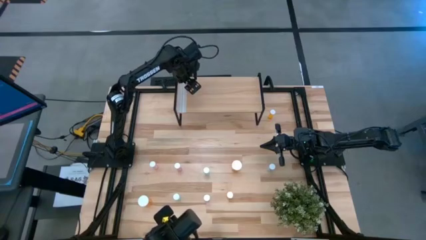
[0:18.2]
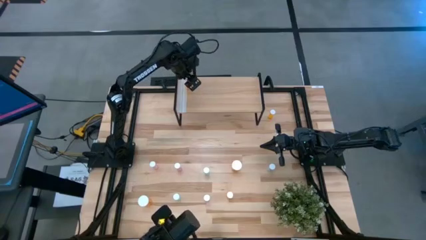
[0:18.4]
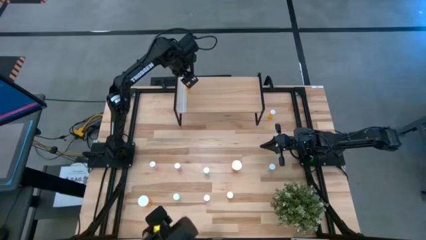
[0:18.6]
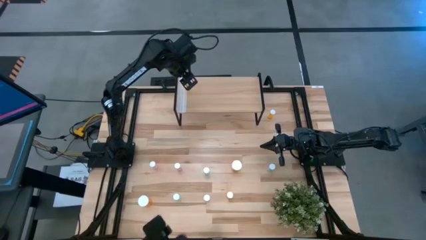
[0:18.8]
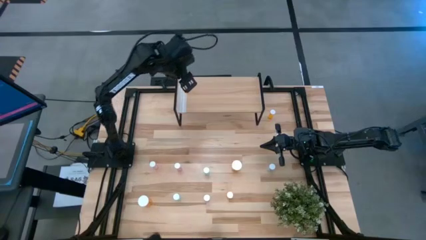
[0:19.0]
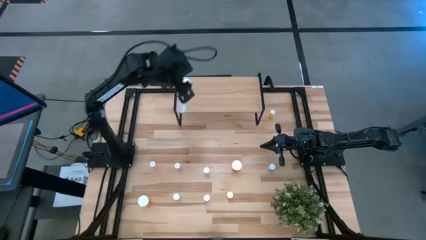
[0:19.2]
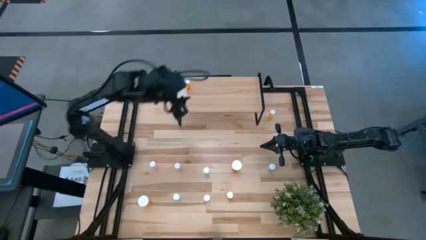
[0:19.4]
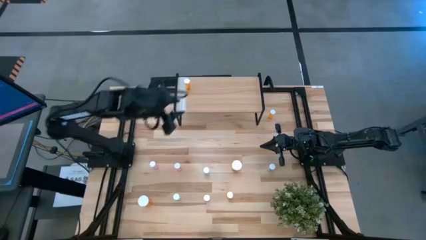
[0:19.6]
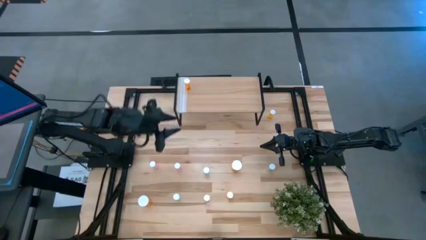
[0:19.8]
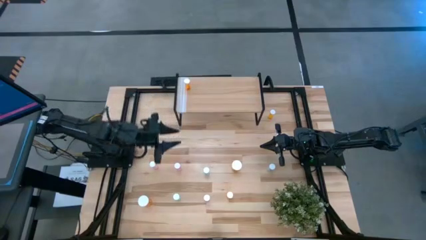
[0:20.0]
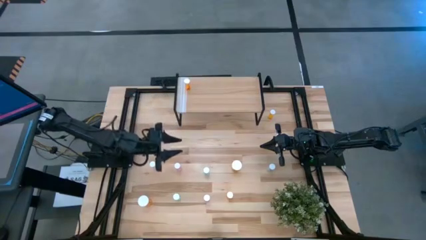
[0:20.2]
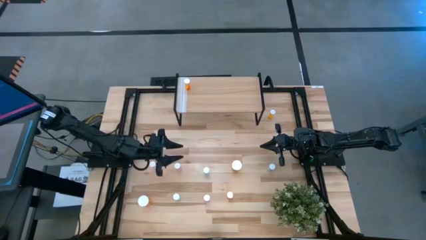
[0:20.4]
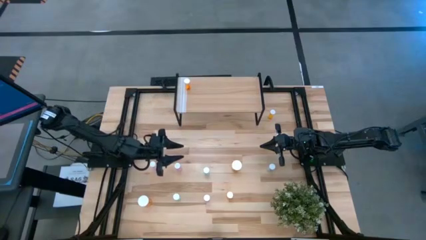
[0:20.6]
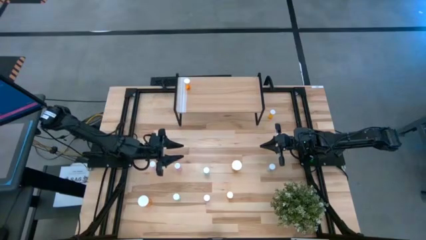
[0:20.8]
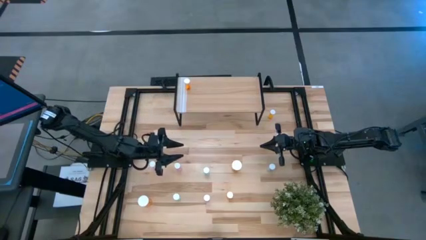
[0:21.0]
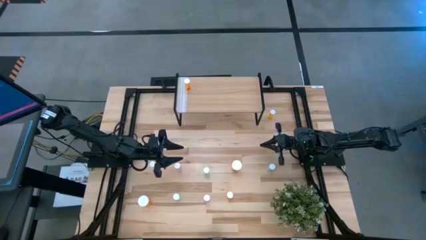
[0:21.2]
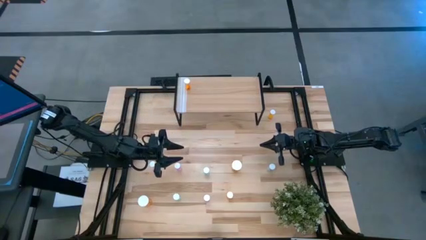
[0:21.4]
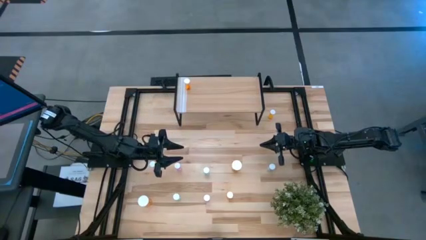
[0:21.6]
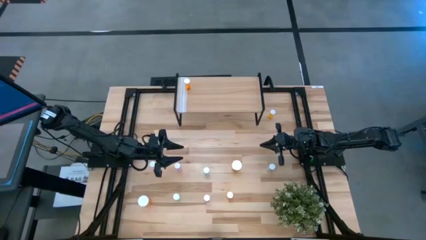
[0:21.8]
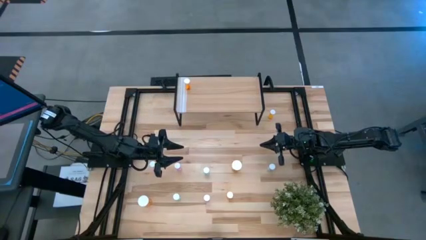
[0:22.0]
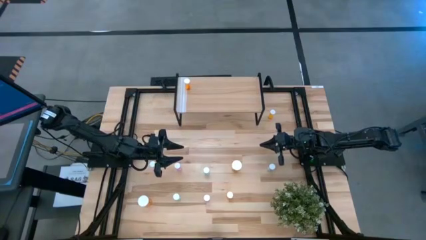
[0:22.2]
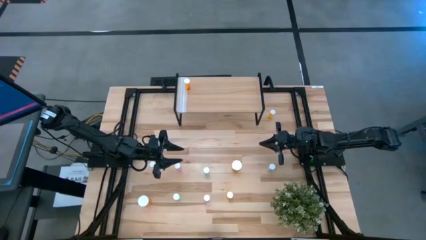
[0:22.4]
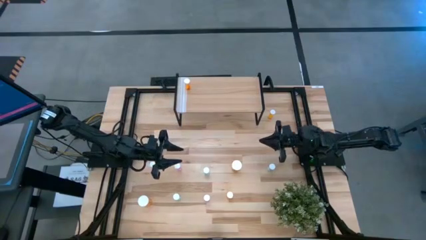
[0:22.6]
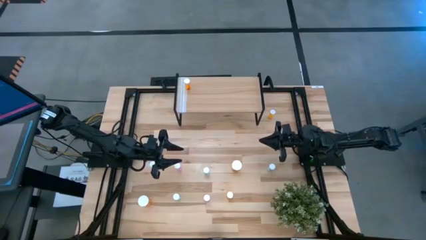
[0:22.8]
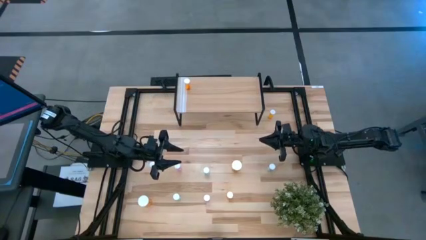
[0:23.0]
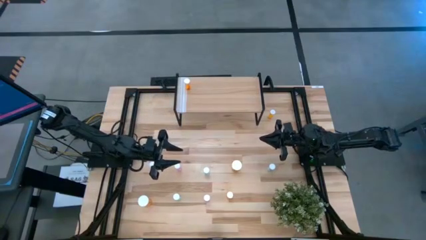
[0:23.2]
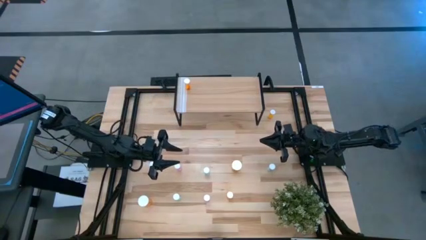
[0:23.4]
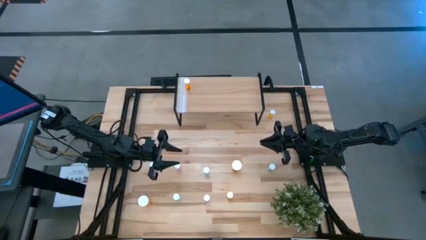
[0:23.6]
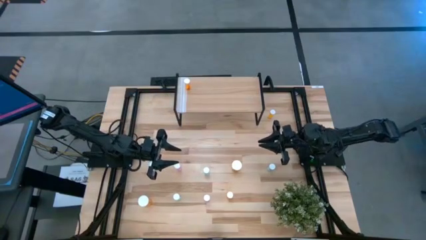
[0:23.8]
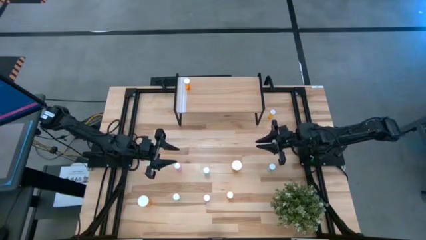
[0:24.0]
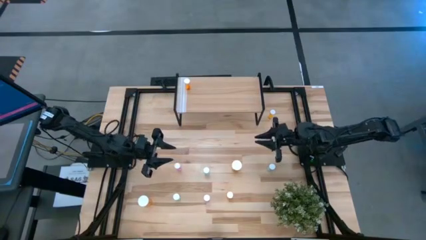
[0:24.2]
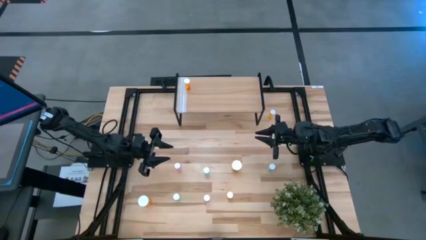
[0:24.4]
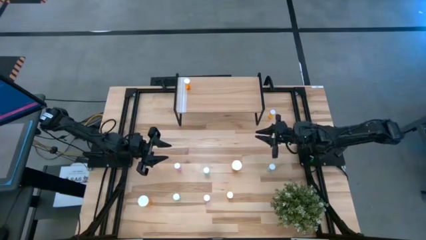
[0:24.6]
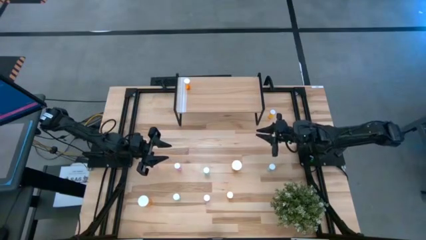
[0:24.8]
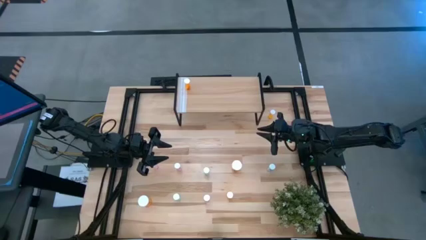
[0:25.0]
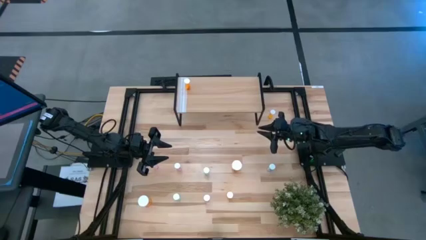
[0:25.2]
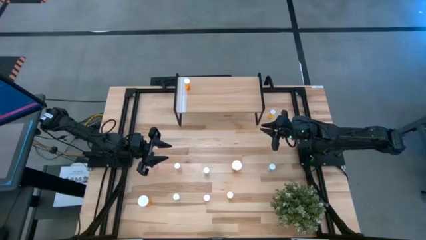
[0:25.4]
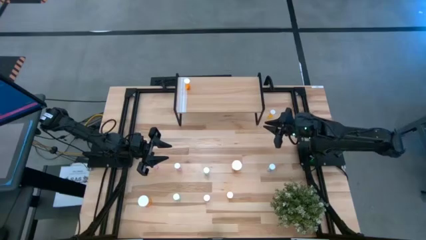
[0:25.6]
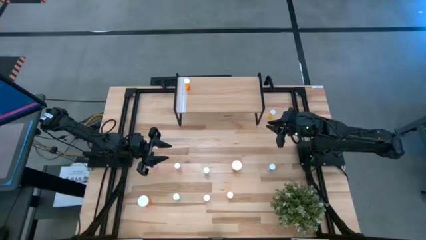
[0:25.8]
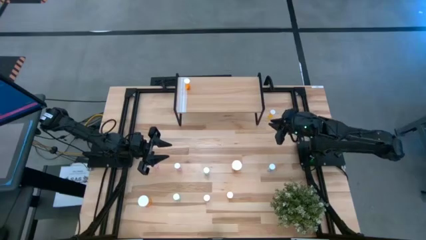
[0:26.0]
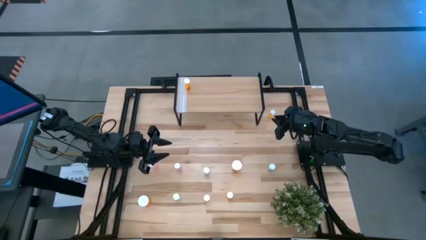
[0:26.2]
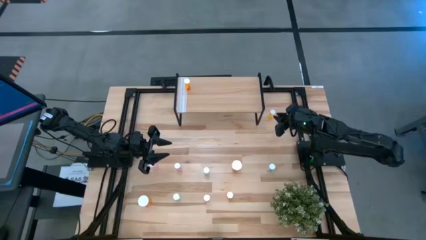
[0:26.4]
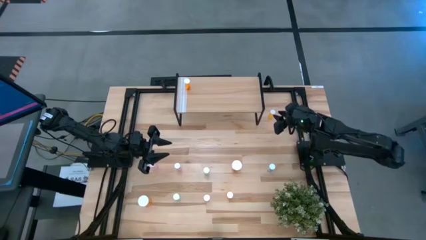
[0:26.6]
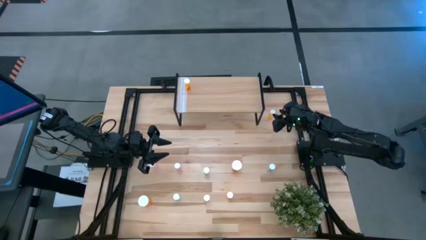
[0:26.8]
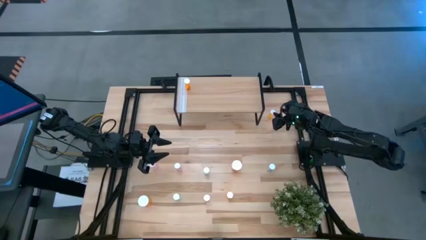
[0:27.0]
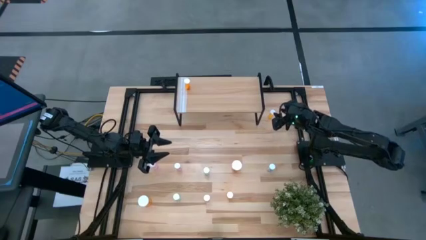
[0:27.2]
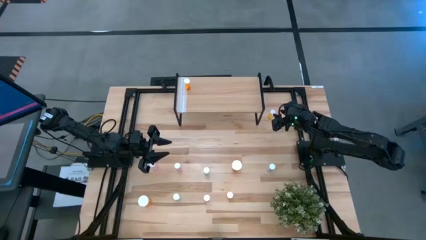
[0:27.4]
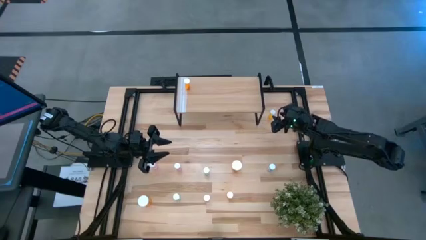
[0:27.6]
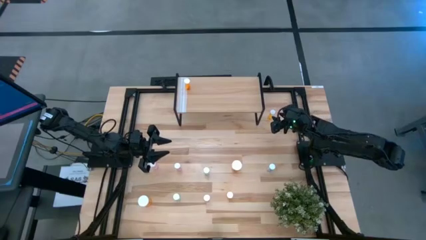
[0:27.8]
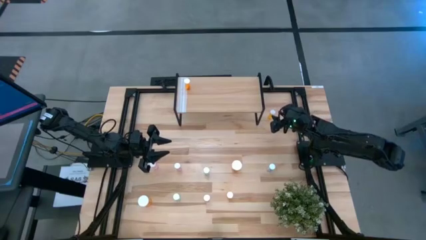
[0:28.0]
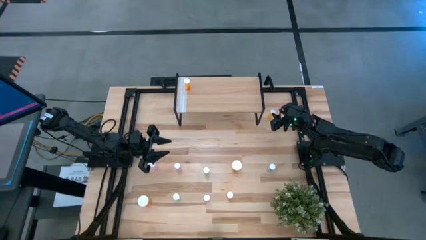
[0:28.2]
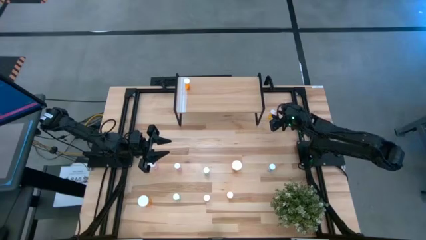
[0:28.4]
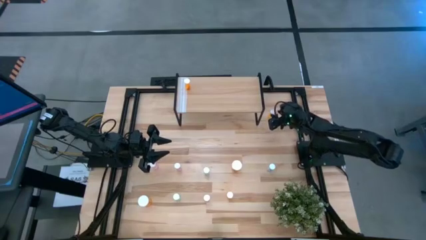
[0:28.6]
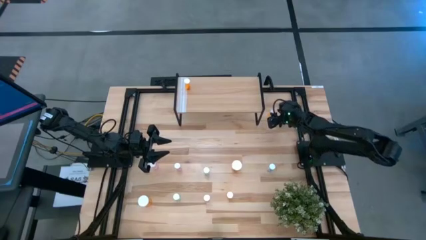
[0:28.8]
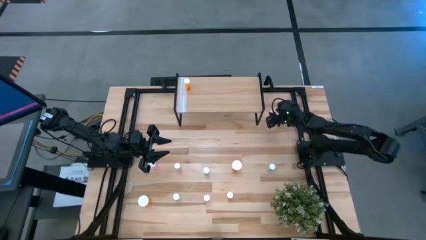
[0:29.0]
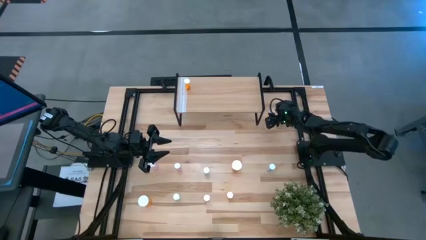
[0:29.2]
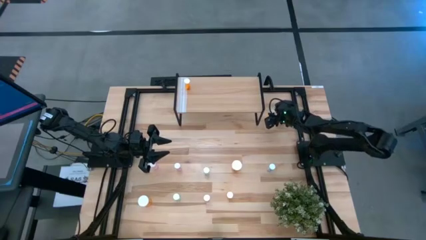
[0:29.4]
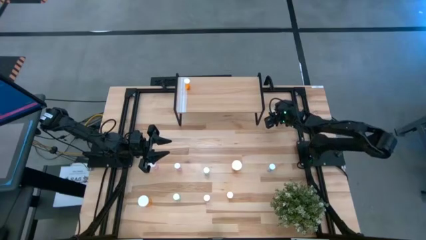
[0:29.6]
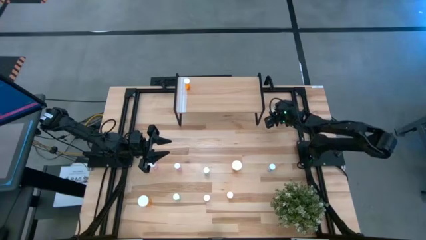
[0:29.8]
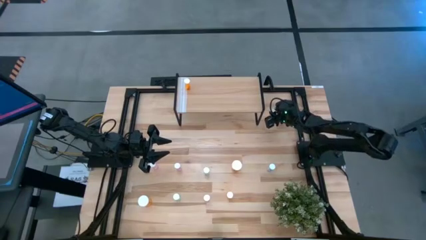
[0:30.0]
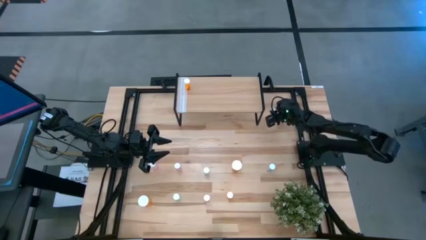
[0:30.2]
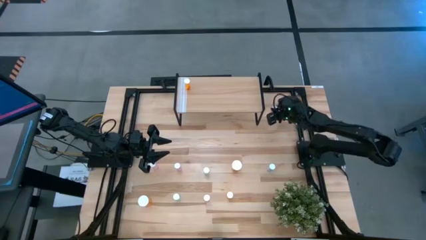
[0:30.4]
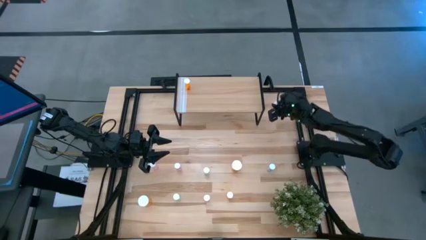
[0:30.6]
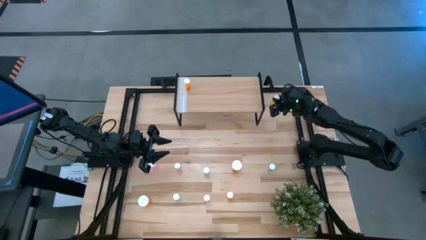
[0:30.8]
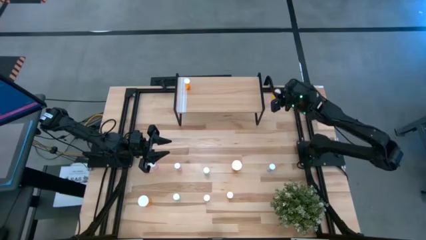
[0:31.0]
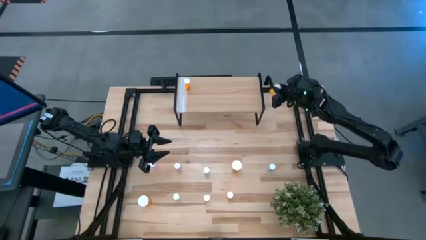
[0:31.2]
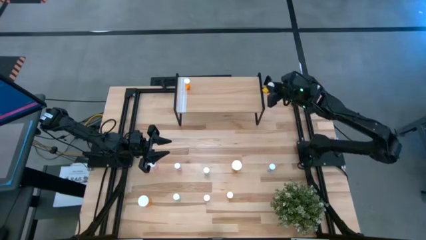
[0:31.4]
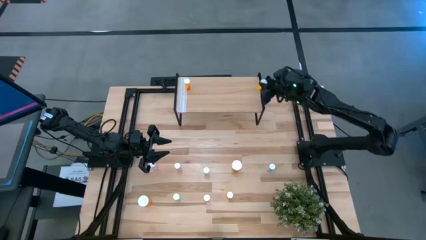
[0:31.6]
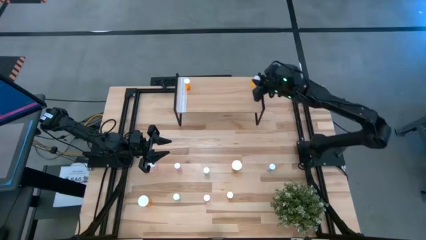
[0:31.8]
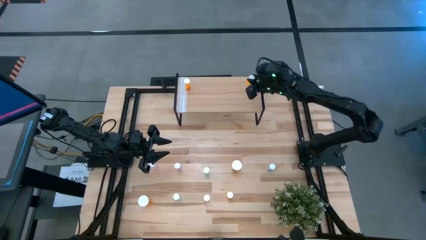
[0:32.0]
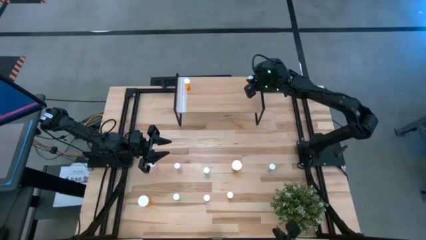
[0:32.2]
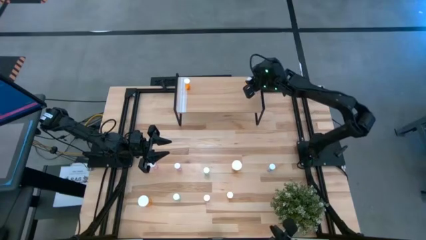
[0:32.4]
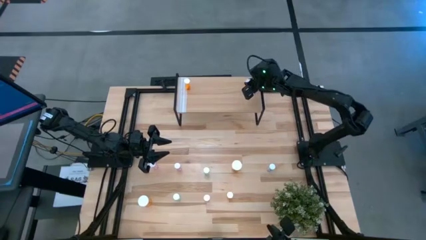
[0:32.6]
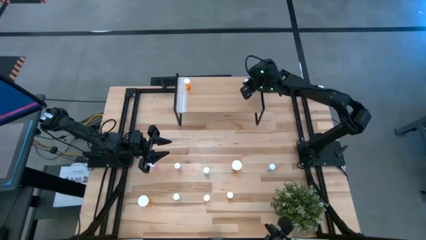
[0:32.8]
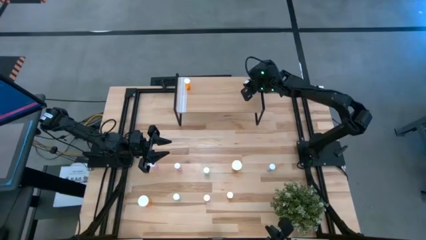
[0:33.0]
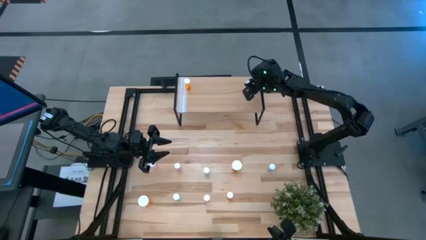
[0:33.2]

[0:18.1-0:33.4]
Task: Pick and place medicine bottles onto shelf by color
Put the top small orange pill bottle on the shelf
